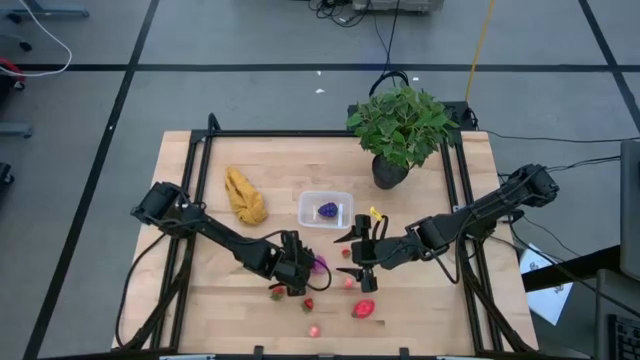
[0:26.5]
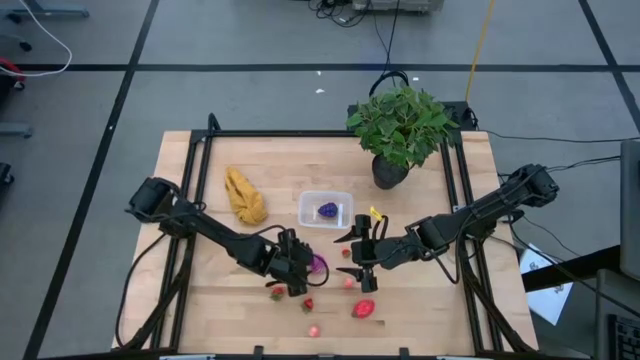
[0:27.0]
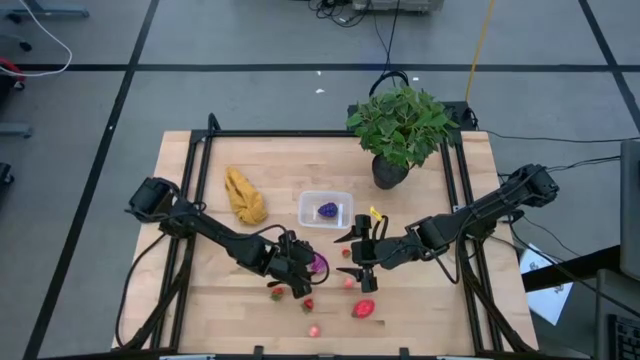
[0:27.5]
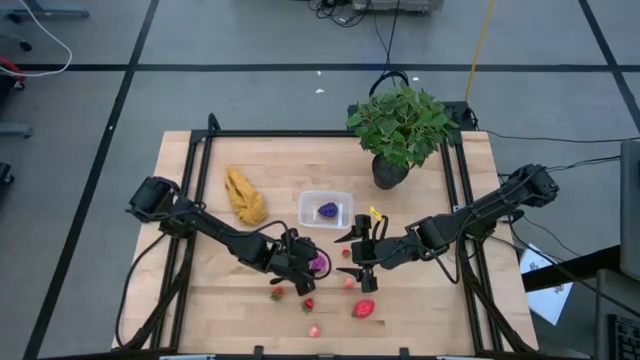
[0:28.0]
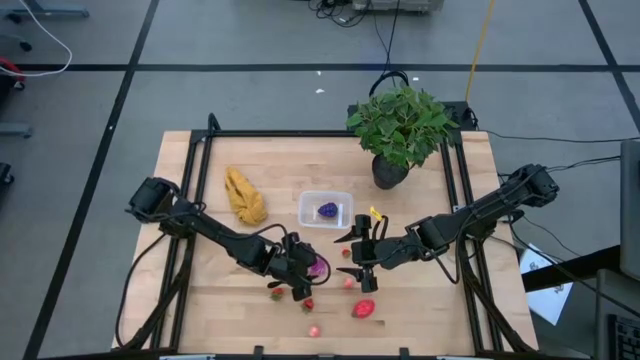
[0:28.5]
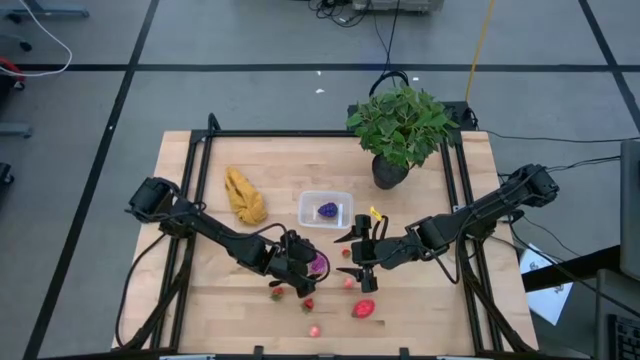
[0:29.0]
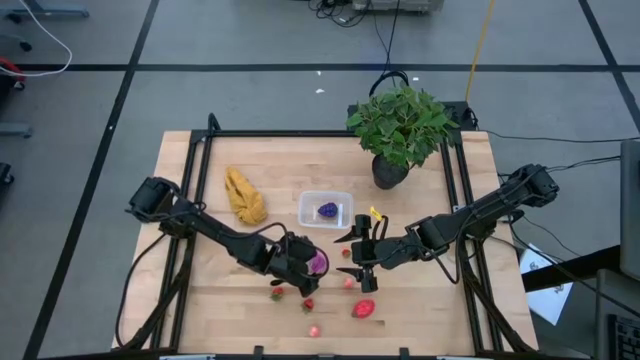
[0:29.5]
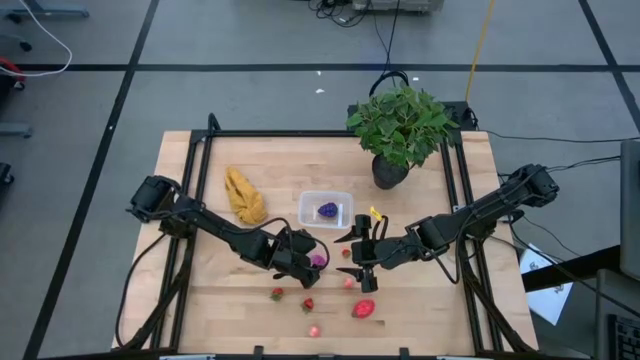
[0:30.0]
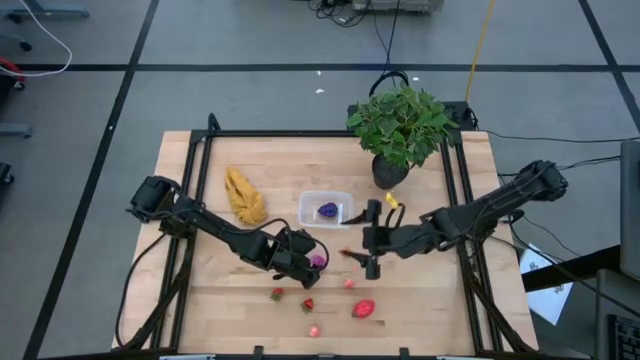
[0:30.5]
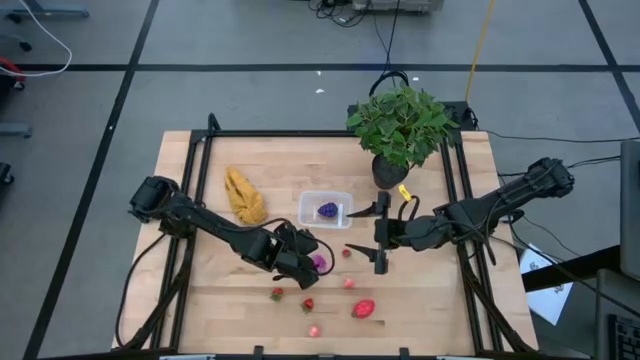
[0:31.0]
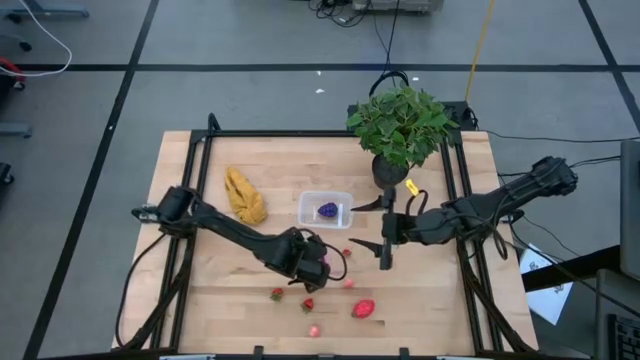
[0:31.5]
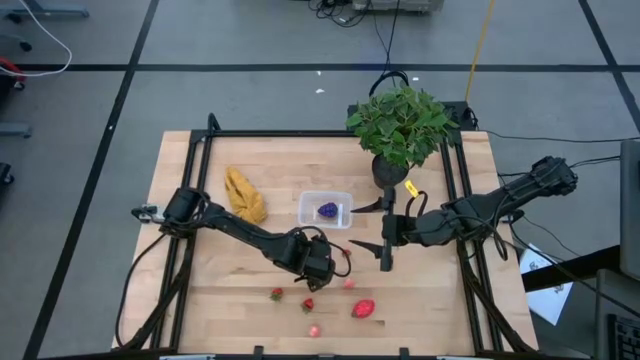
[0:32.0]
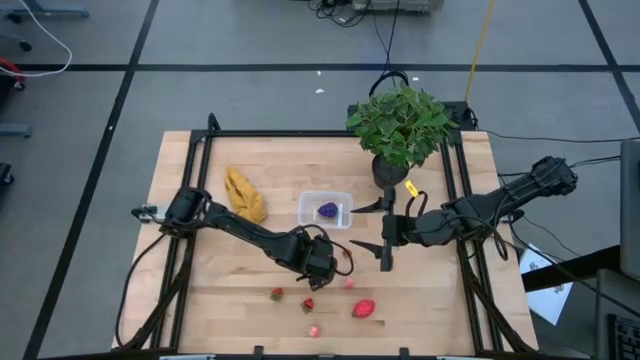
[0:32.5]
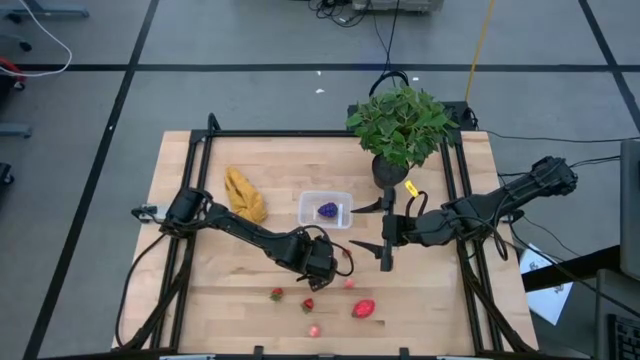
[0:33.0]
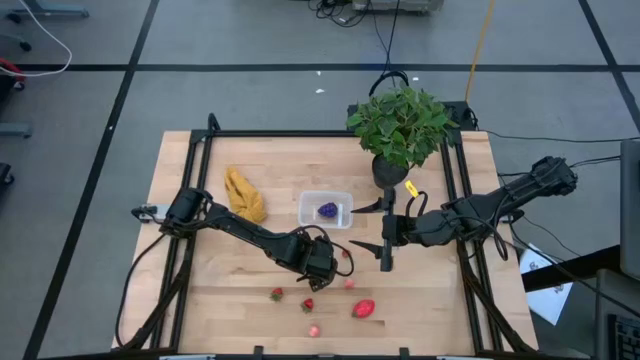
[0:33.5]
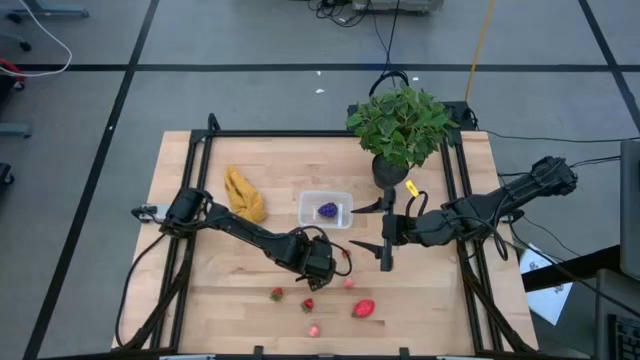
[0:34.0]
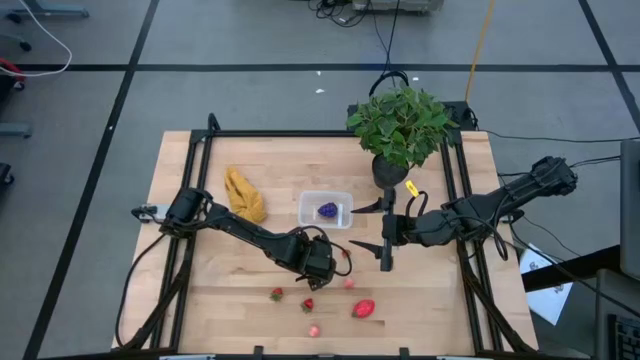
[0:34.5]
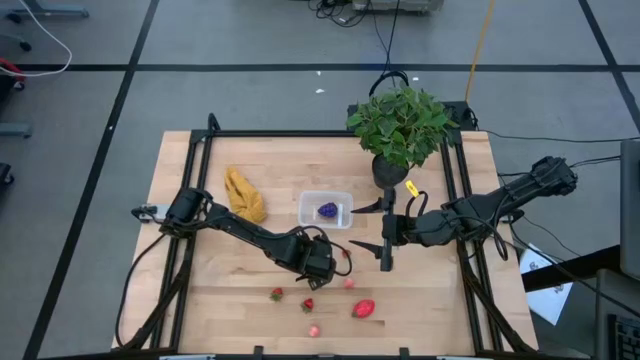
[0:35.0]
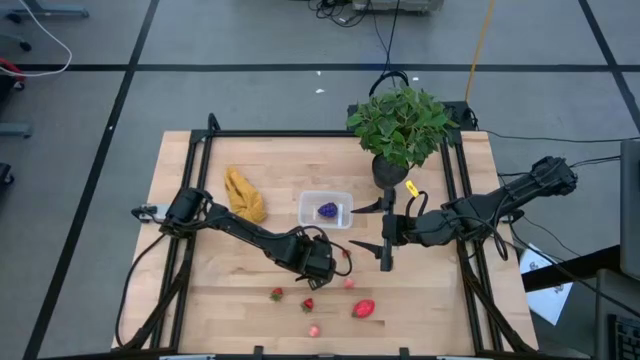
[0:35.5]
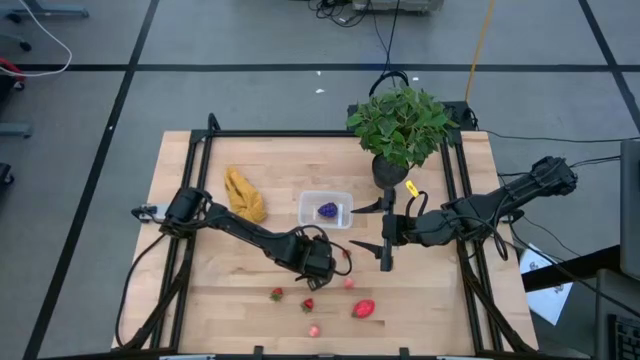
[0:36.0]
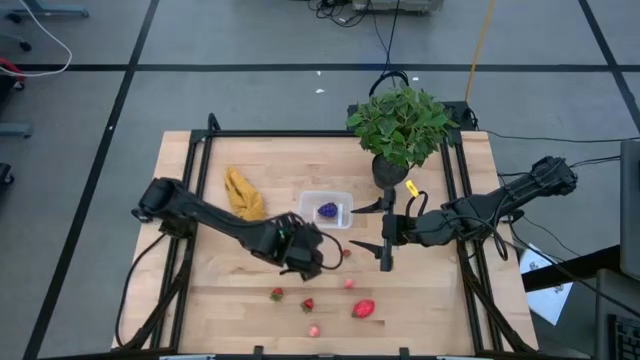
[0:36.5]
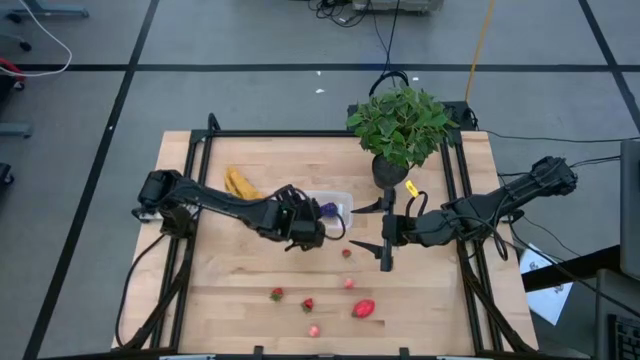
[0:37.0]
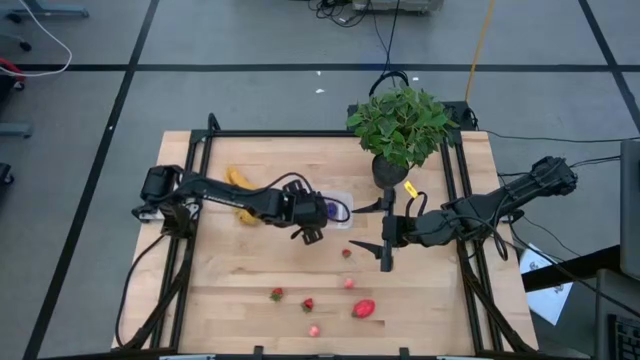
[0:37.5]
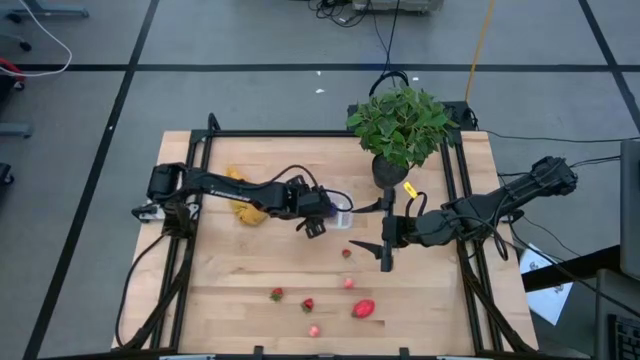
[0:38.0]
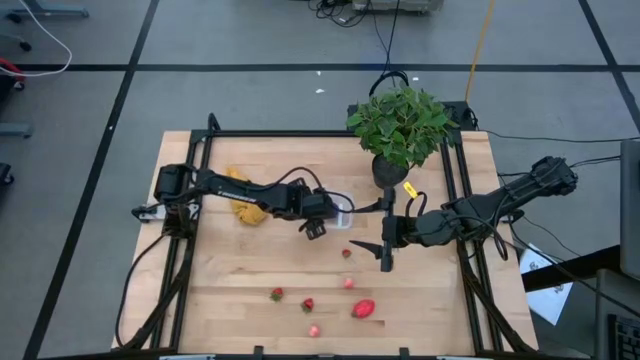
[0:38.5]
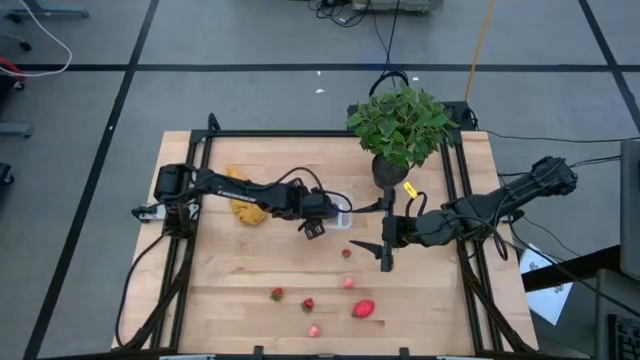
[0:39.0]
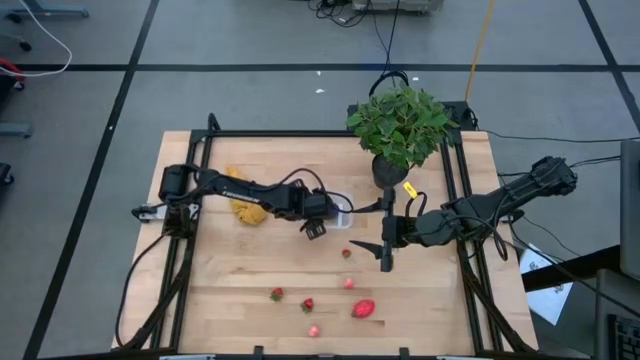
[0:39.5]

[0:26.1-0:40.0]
Task: Pick and placing Produce into tupperware
Put the purple onion into the transparent bin

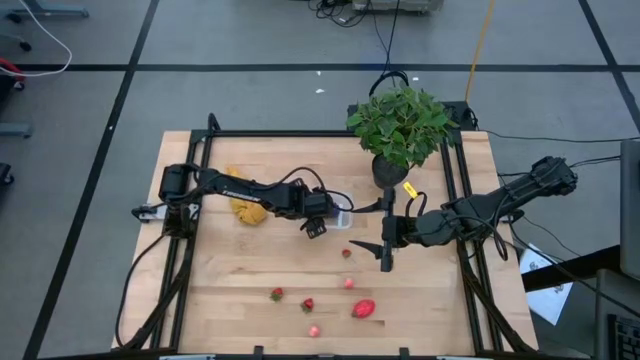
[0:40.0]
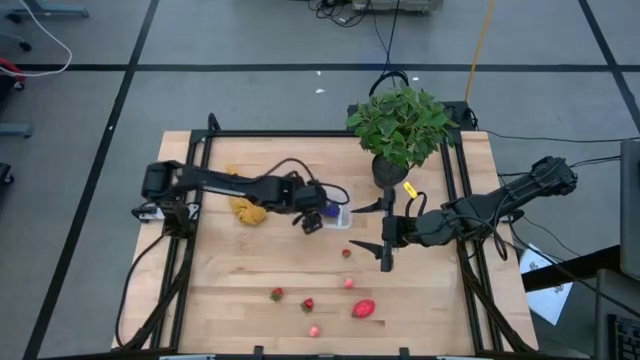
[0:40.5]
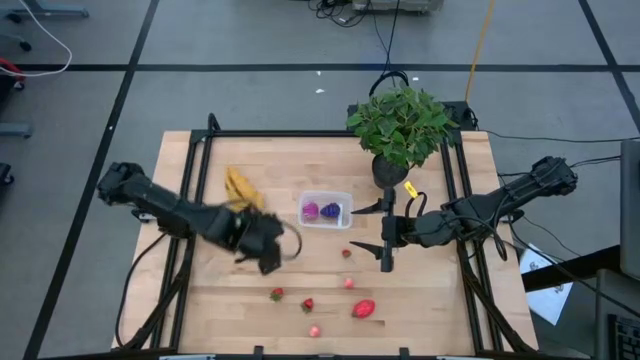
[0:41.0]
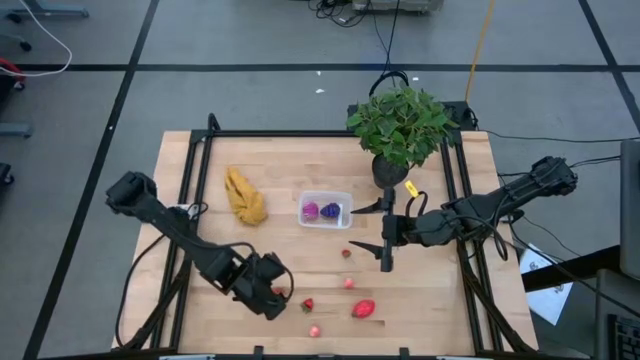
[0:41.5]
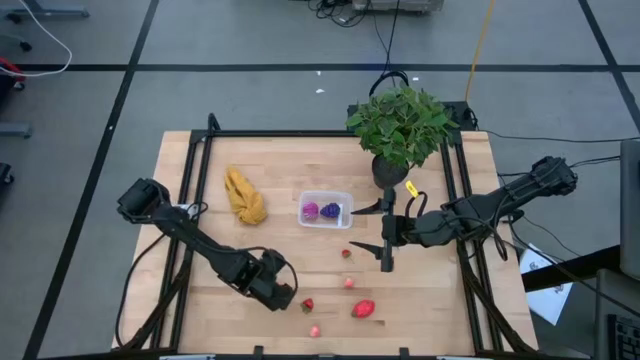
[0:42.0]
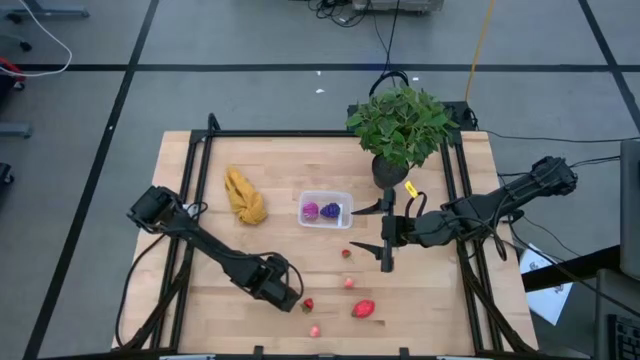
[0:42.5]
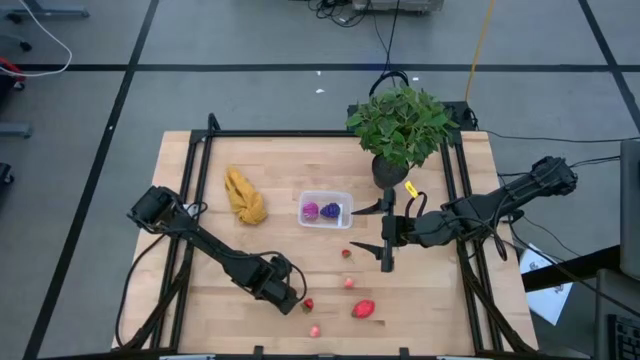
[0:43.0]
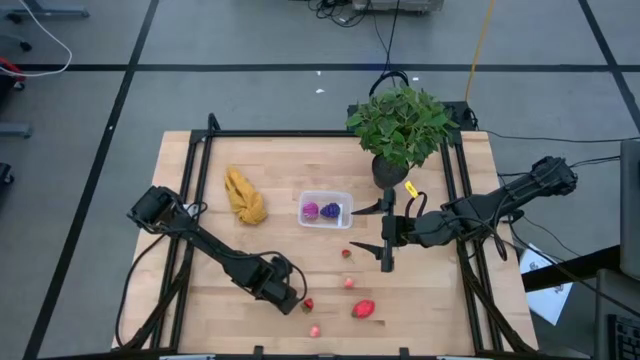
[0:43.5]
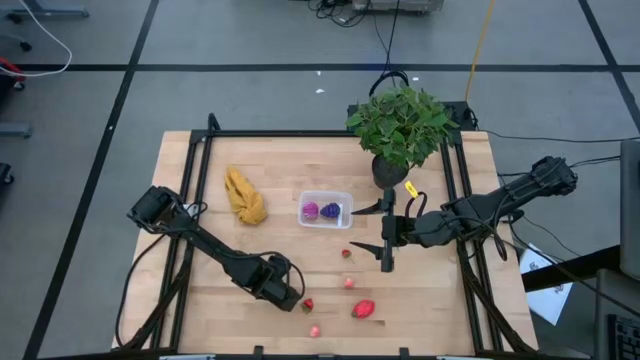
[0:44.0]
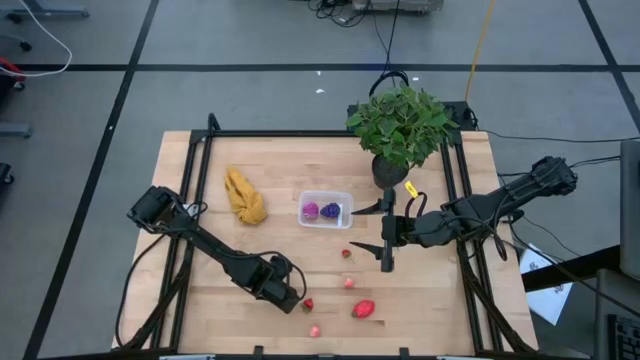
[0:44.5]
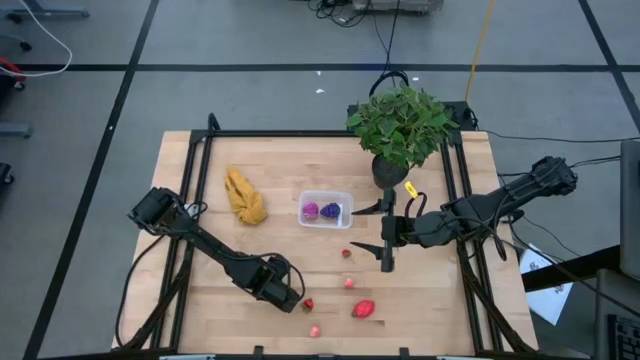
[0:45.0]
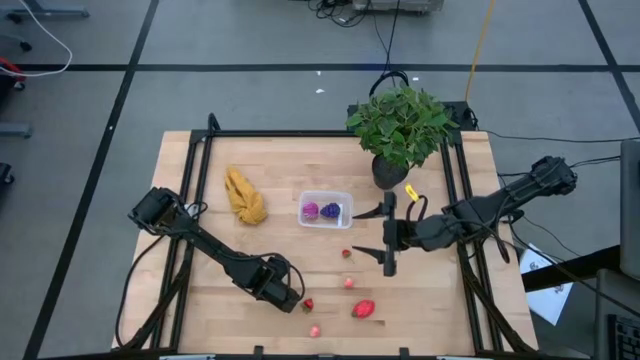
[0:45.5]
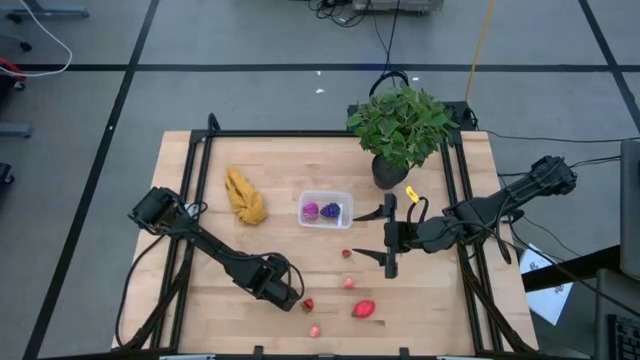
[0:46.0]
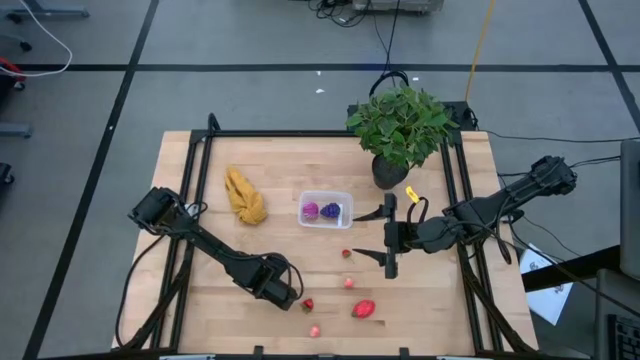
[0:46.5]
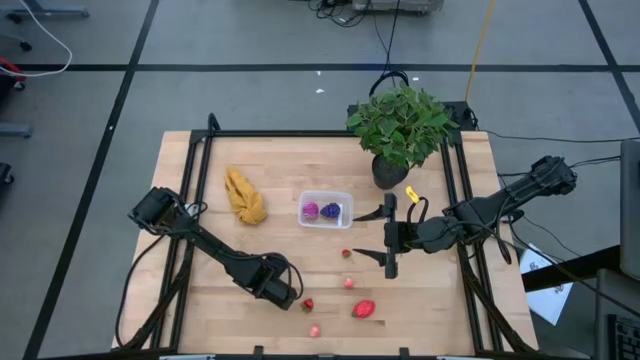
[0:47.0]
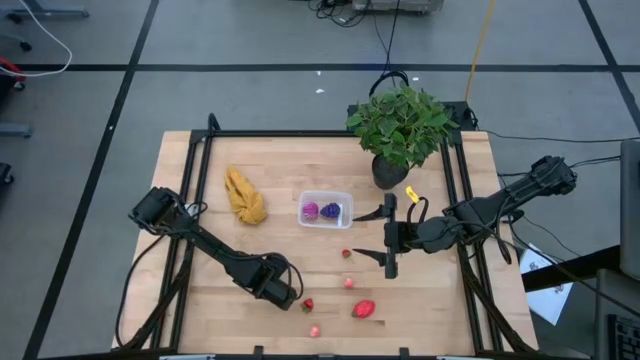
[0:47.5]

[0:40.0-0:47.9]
Put the bottom left red strawberry into the transparent bin
